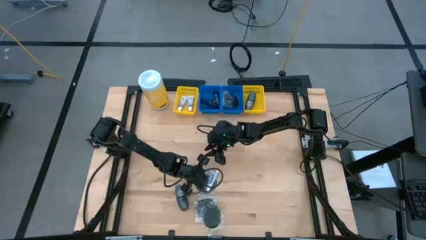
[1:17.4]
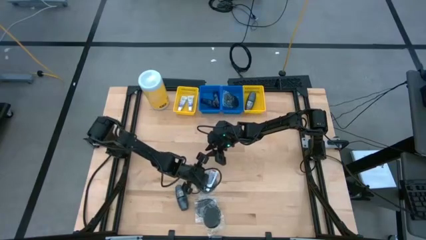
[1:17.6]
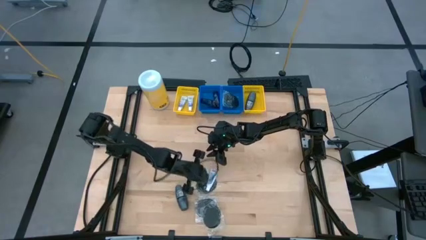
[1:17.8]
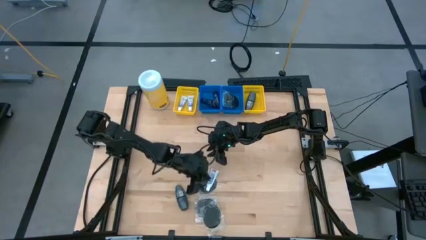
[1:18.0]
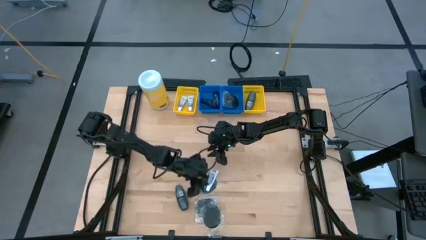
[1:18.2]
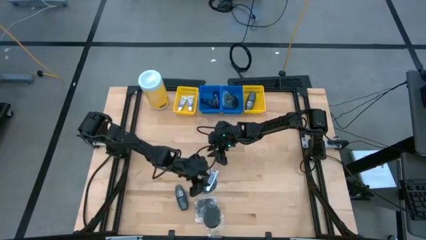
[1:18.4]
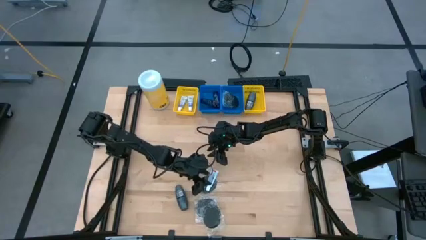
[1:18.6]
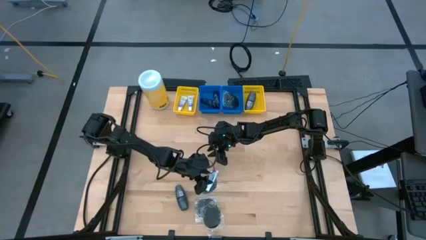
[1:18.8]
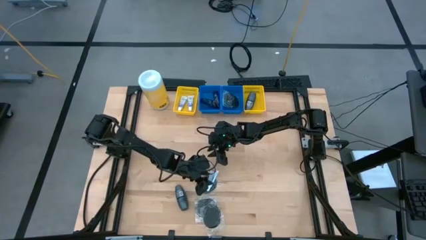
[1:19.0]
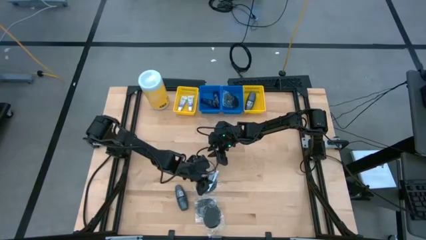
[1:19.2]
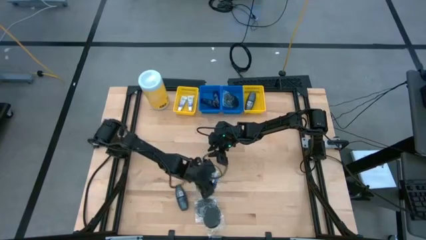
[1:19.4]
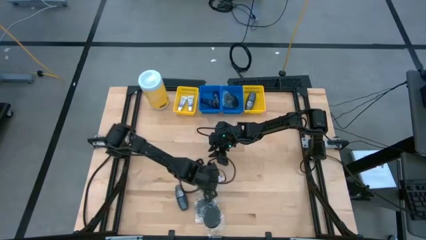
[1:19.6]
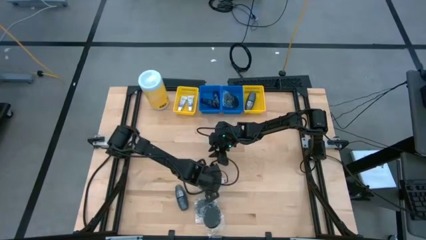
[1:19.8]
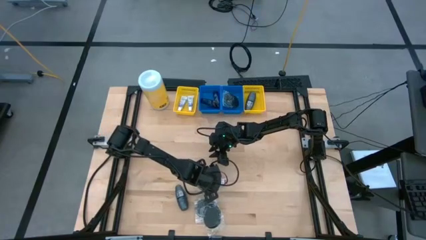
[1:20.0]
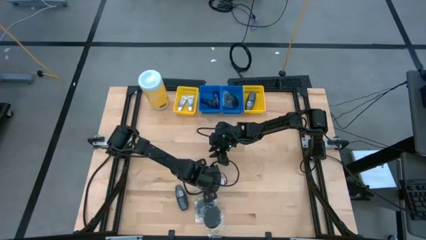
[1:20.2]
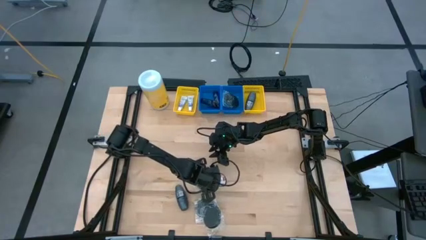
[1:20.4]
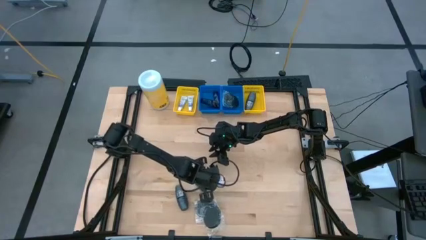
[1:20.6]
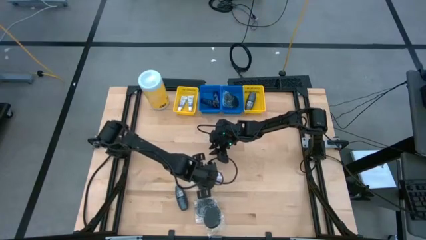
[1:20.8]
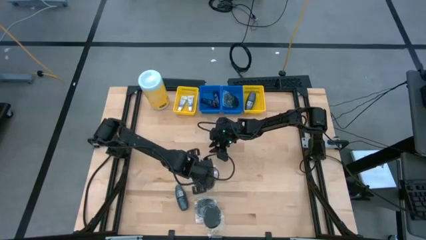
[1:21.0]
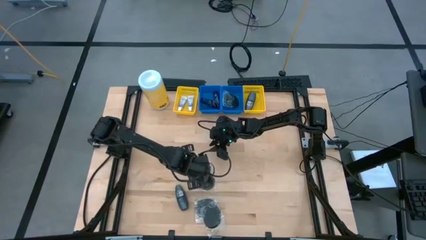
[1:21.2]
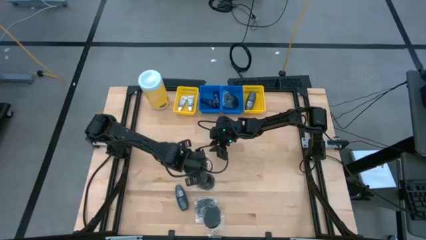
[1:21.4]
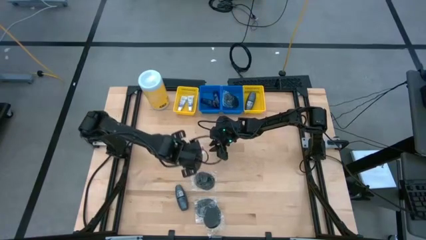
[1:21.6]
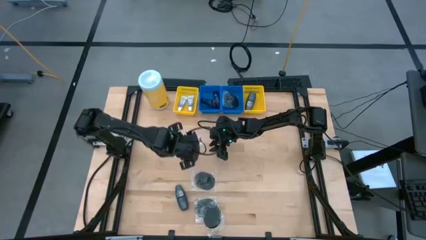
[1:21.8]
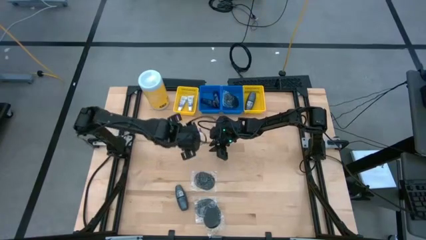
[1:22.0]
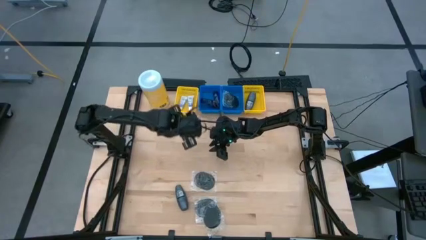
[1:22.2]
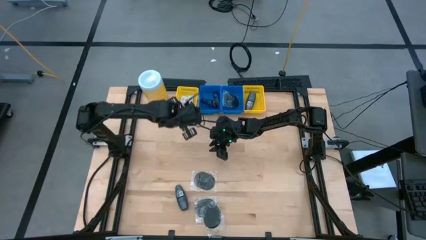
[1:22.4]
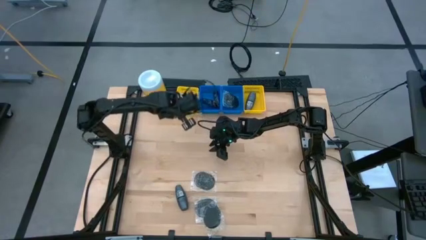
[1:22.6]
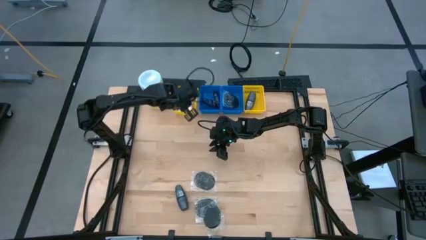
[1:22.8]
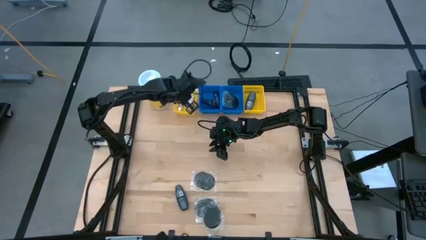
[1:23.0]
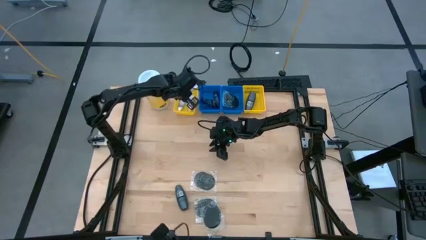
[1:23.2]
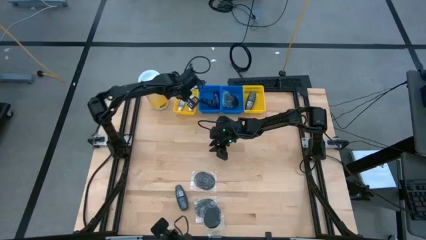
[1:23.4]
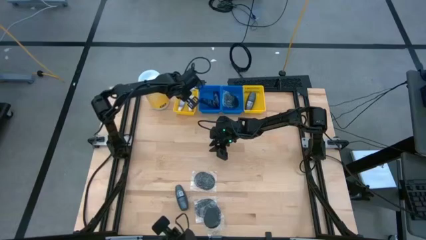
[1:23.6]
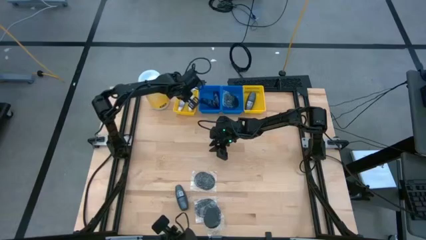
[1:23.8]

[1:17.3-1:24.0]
Task: Pick & Place Travel size toiletries
Put the toothpaste into the left yellow bin

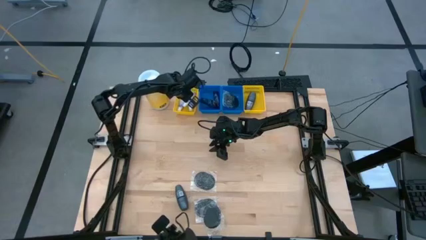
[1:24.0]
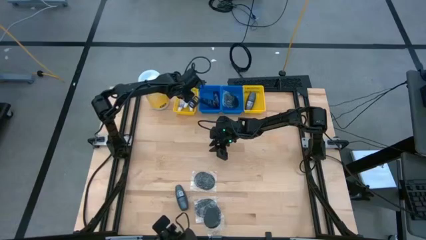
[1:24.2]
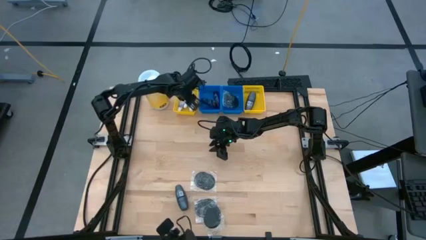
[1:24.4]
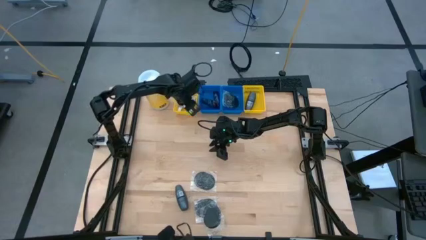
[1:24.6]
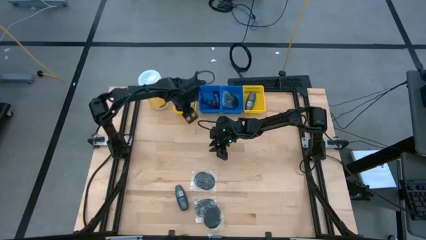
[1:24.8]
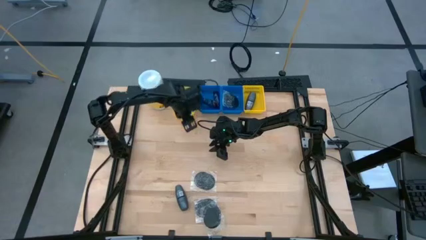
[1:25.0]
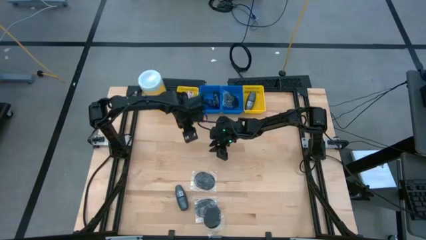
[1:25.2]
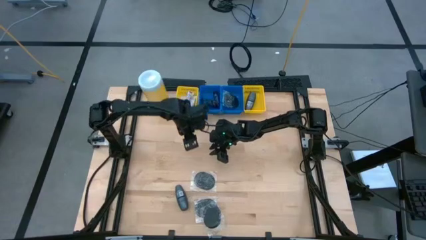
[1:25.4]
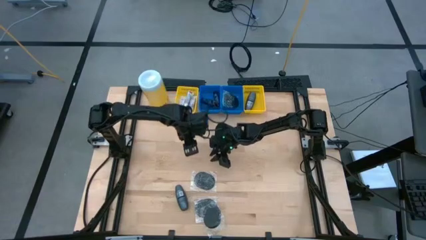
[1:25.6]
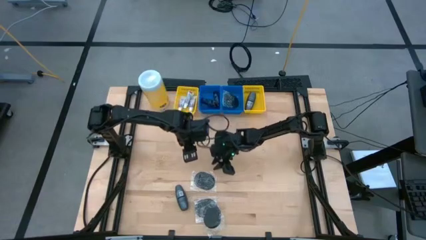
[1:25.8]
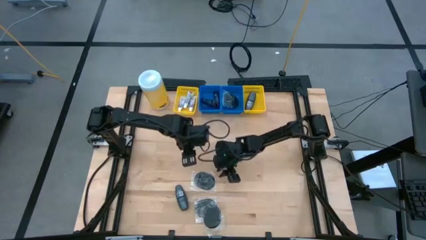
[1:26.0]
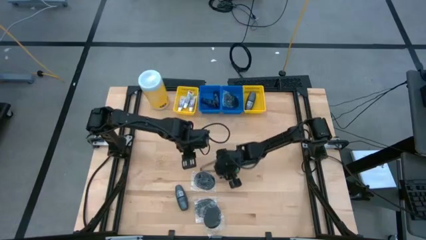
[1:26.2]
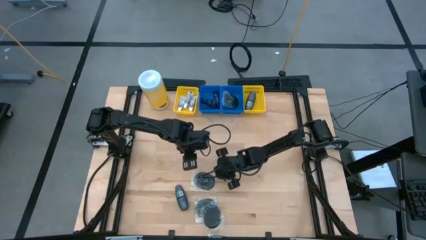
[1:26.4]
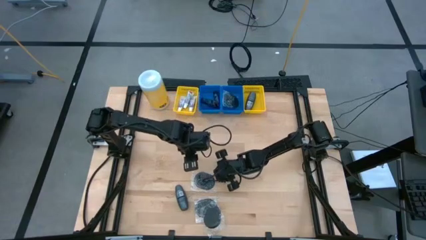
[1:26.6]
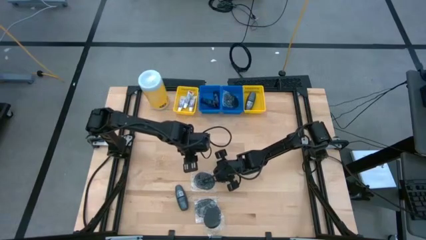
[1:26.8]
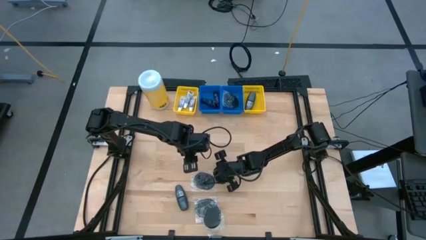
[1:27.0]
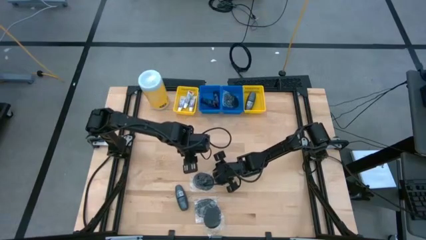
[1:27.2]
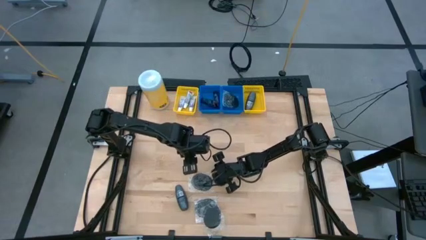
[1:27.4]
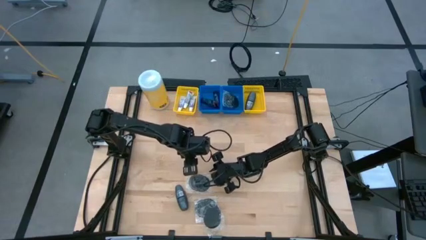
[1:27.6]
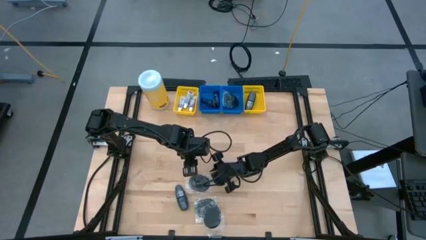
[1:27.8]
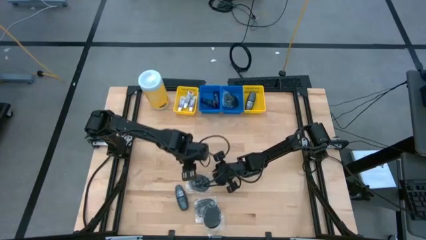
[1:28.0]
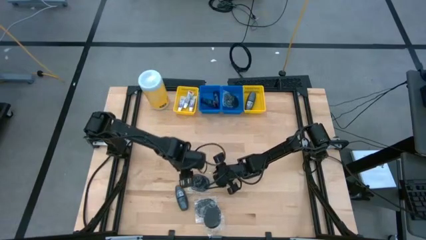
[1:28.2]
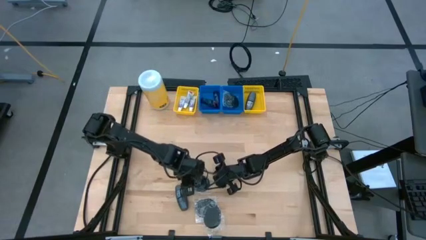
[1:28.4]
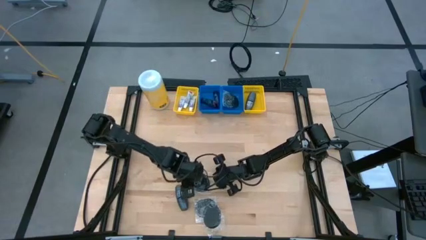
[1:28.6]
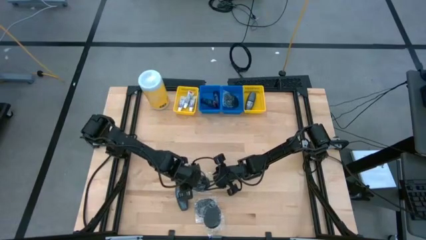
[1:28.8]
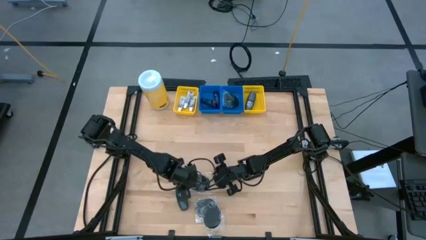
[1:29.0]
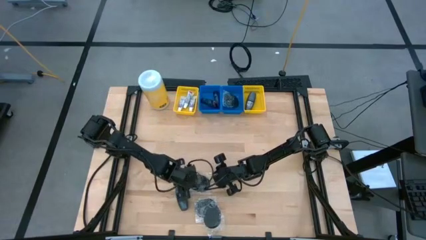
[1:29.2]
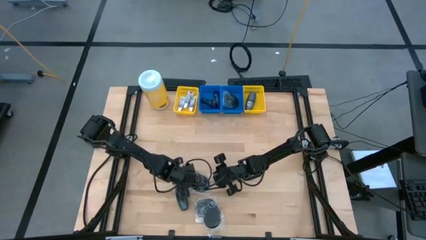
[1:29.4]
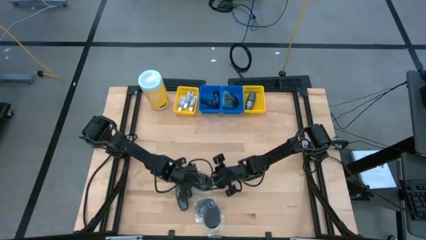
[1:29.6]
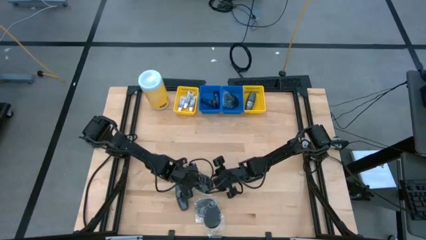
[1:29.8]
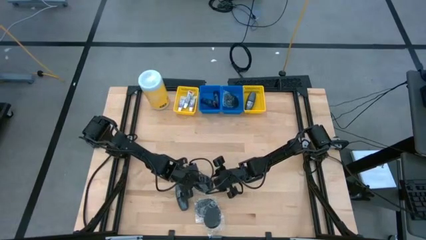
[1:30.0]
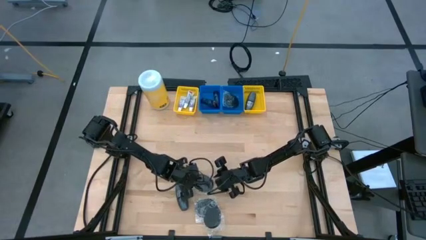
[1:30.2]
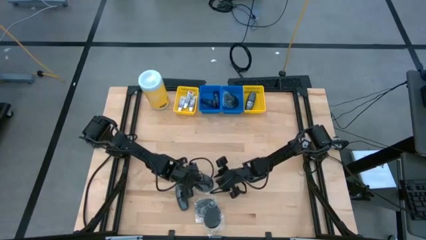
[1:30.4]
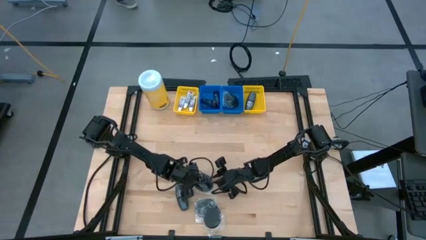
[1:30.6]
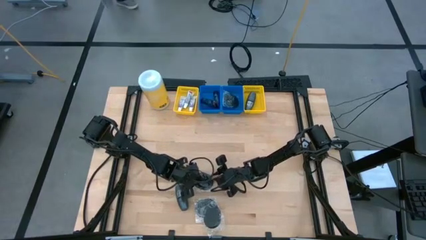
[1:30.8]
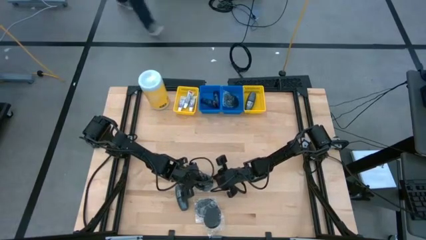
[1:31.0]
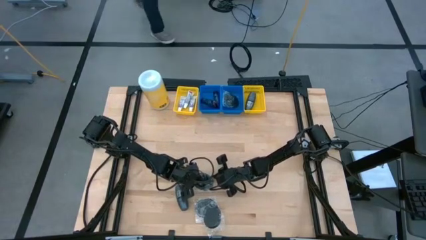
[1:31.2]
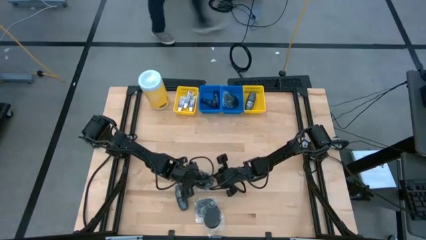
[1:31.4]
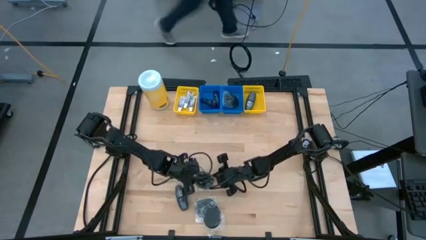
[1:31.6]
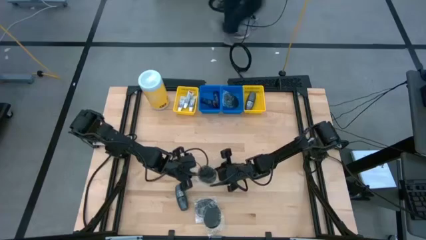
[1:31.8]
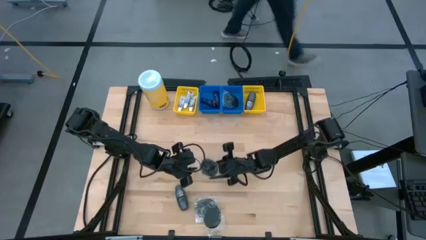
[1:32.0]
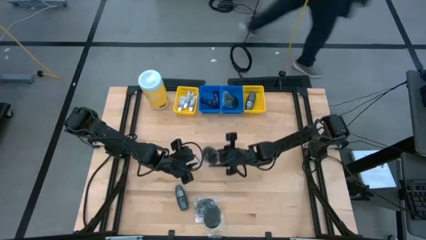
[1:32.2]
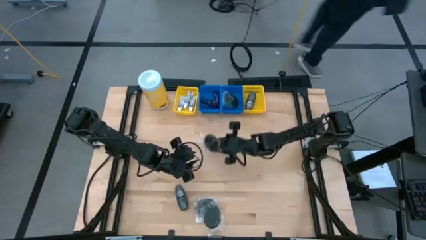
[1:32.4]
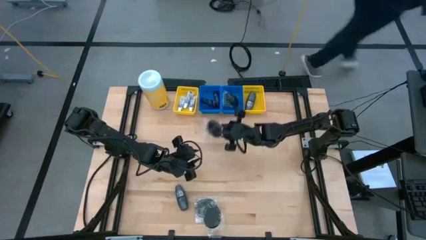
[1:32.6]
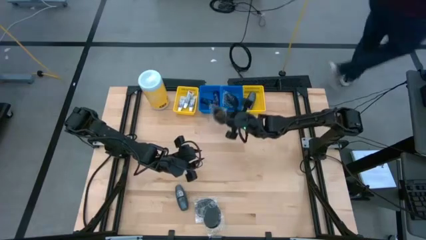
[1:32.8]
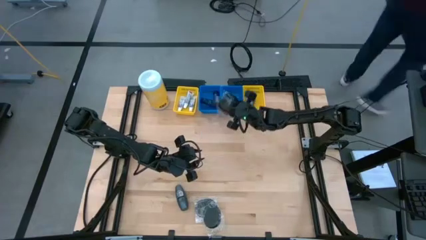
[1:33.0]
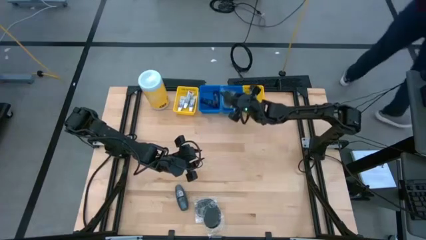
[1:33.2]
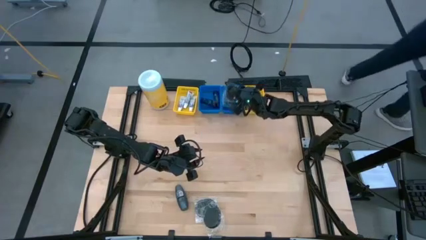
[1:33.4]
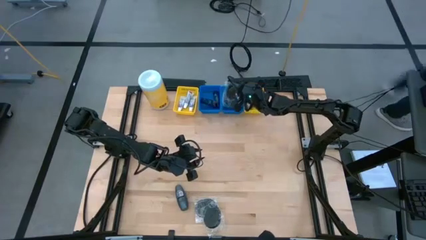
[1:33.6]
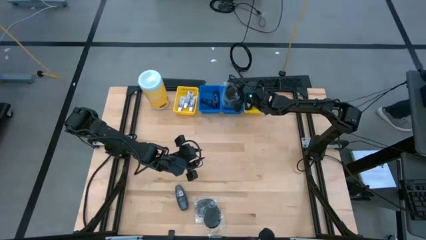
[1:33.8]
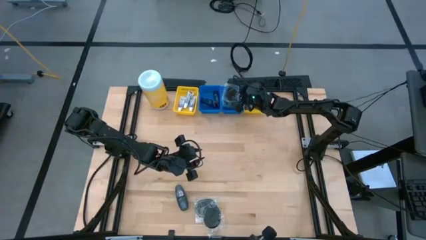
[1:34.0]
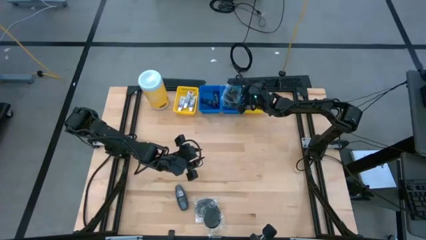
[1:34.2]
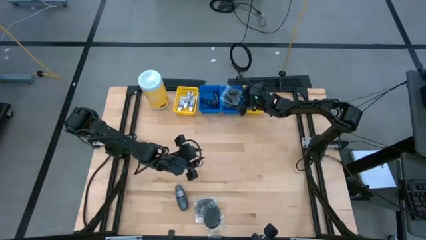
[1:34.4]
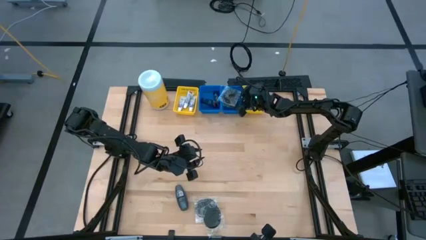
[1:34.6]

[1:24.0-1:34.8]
Put the hairbrush into the right blue bin
